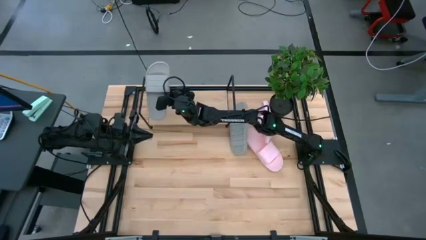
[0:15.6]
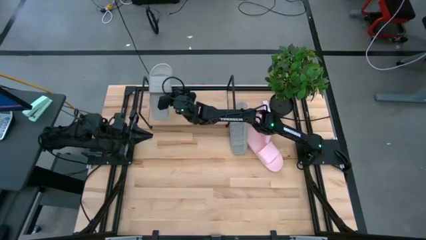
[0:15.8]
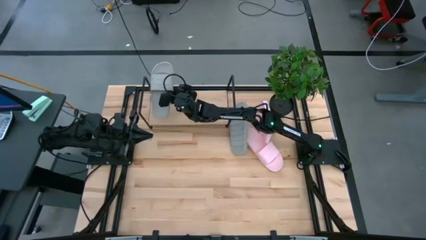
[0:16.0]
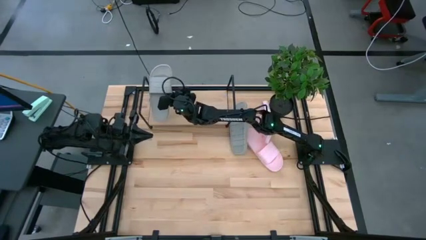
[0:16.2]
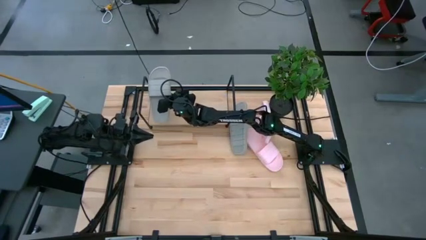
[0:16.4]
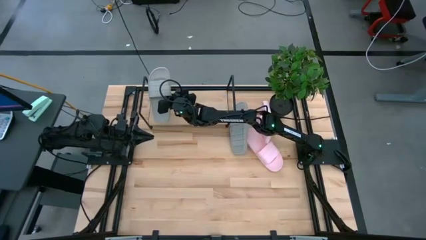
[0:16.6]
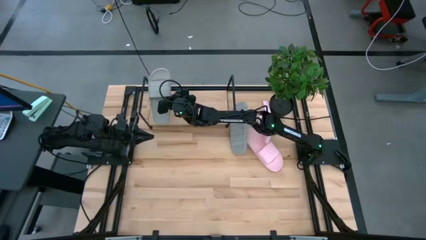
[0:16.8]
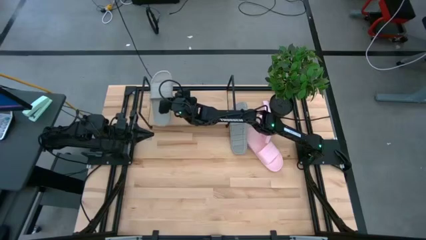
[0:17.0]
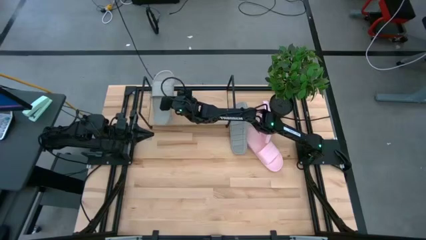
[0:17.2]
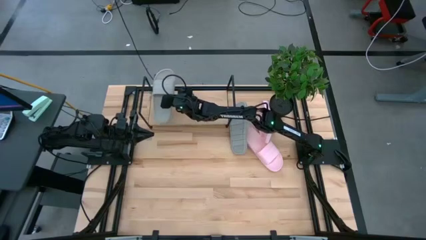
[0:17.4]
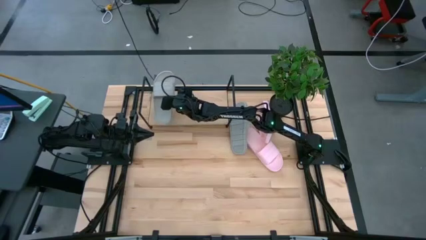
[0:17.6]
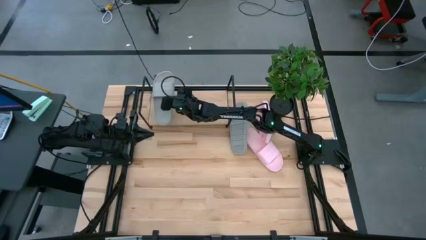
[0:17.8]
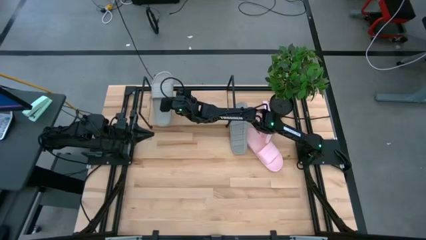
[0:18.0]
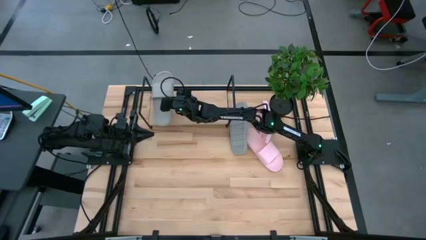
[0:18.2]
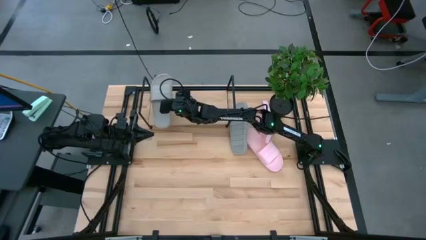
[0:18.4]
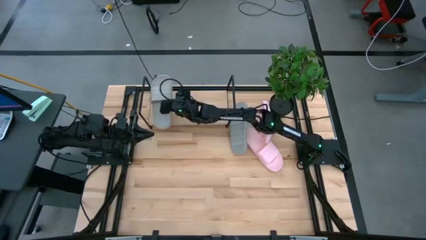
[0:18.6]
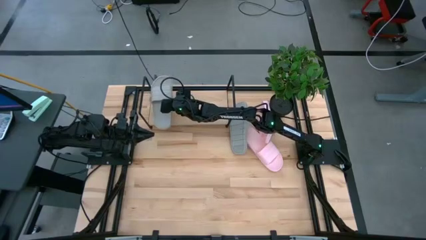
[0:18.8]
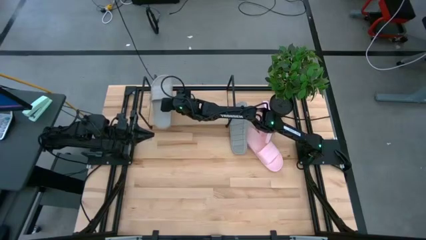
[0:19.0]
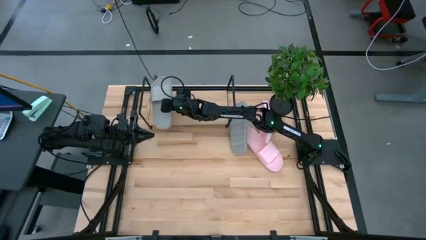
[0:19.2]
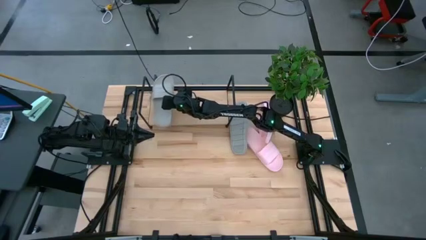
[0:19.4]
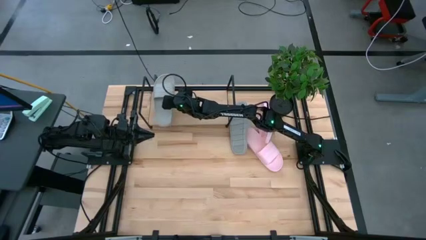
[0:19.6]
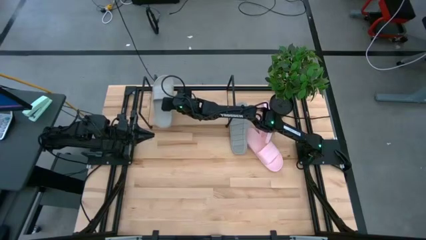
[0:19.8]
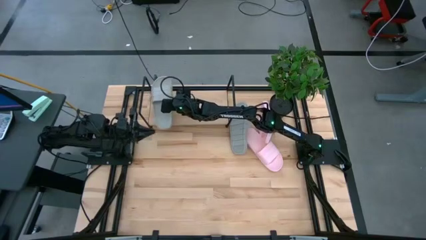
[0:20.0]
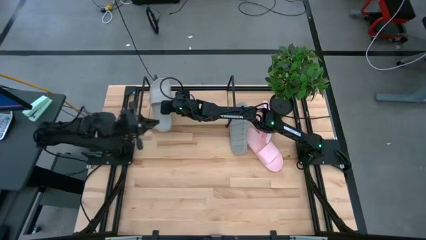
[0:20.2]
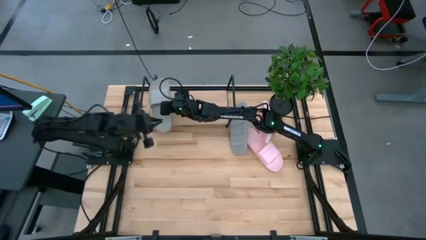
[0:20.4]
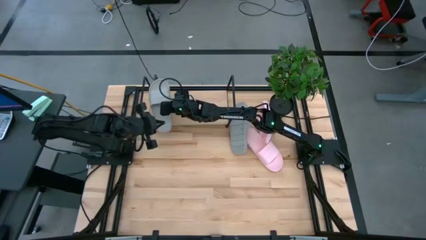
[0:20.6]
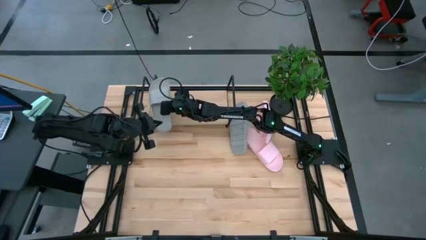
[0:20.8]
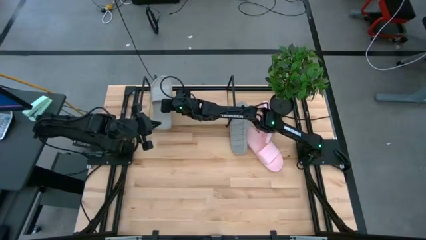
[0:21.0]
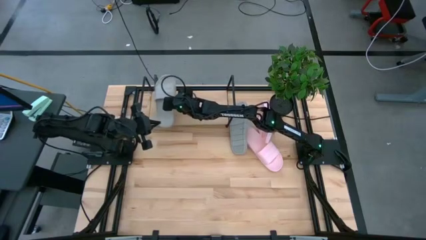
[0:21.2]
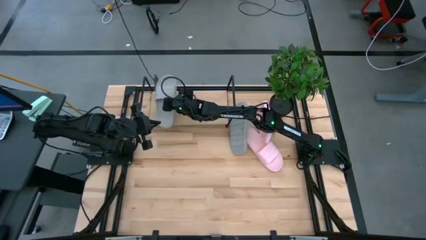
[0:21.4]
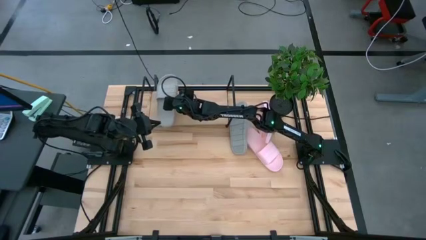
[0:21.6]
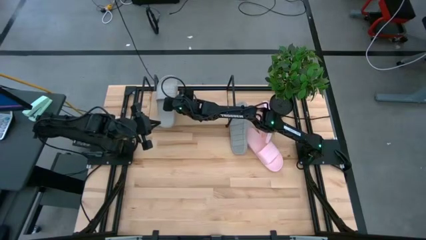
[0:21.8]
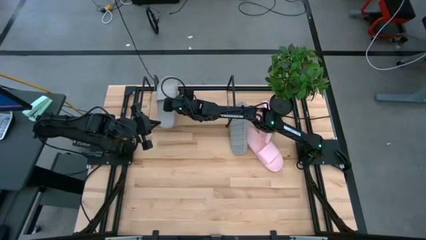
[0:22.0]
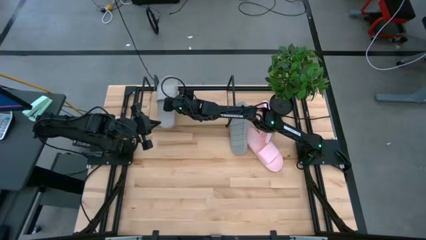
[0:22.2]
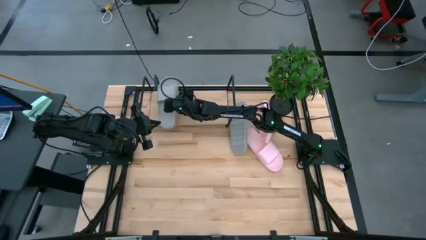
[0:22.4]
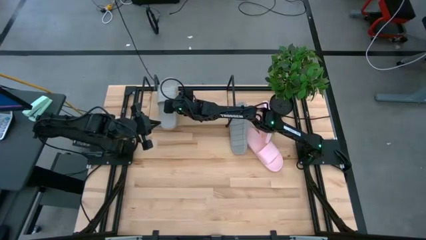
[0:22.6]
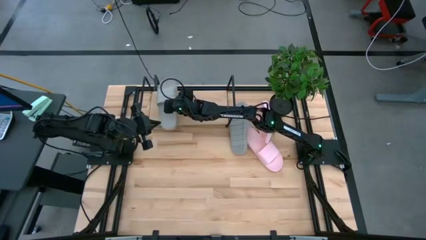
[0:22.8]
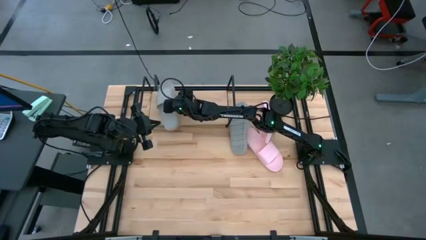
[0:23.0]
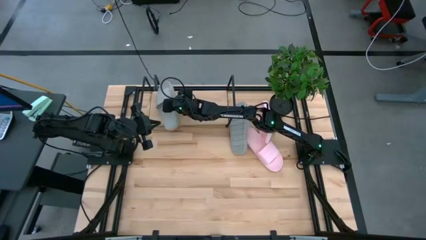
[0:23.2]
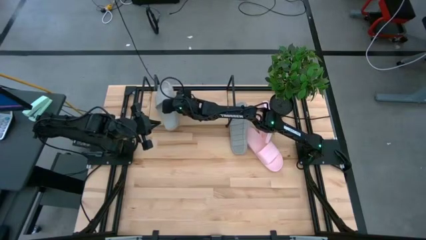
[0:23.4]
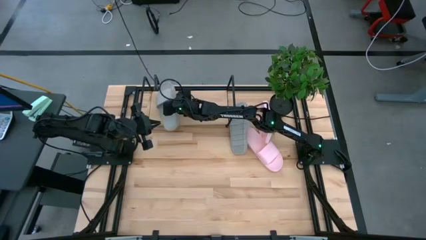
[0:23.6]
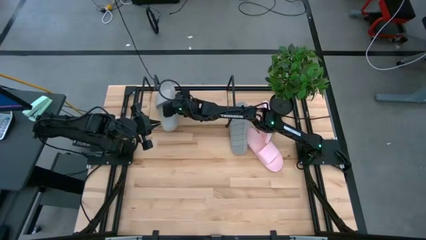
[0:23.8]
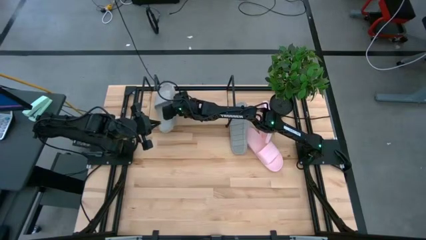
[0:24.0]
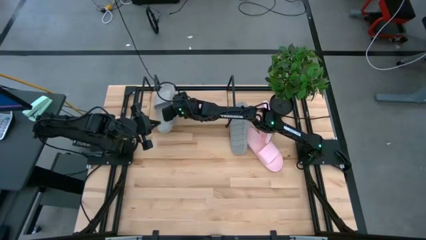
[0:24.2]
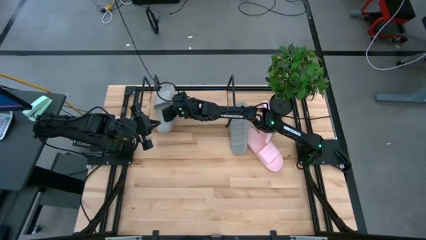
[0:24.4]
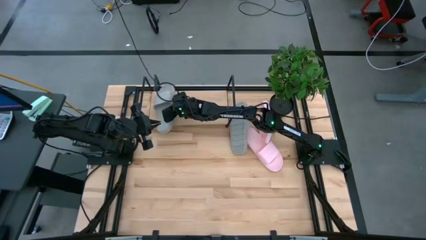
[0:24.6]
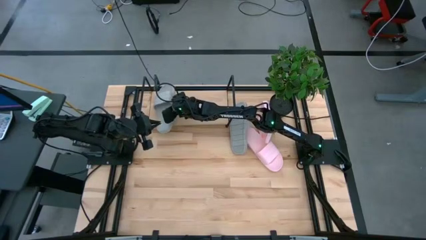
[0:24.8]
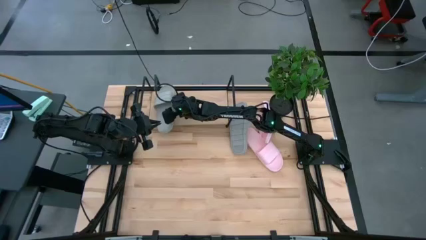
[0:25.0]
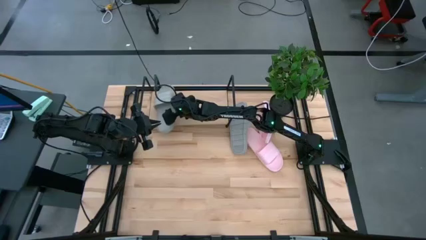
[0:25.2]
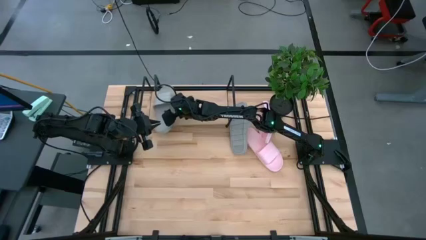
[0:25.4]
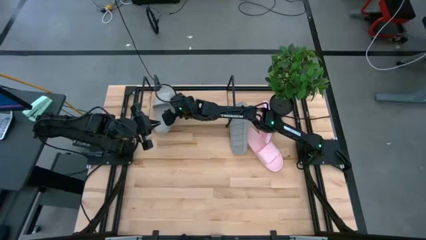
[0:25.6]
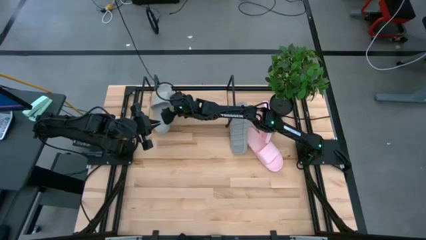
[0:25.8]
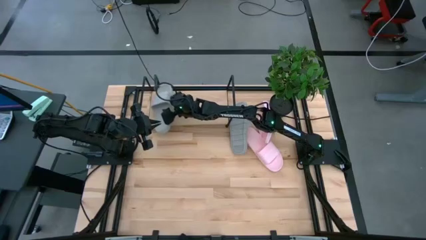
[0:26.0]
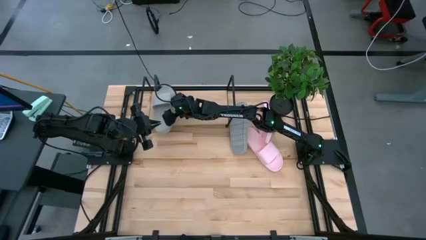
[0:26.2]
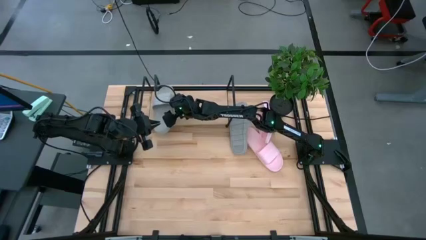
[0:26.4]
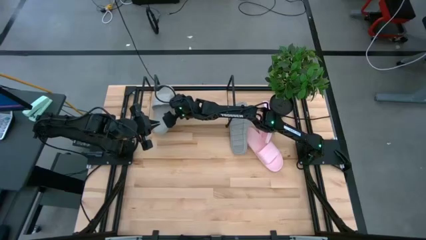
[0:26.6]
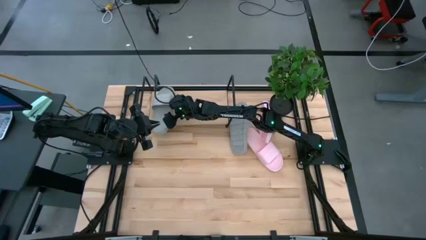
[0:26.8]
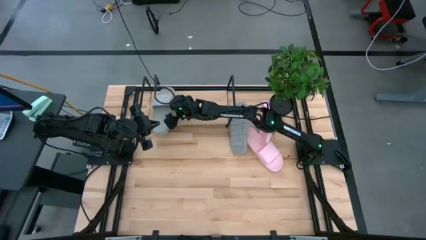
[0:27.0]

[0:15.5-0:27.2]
Task: Pick and place slides into the shelf
Put the bottom gray slippers on the shelf

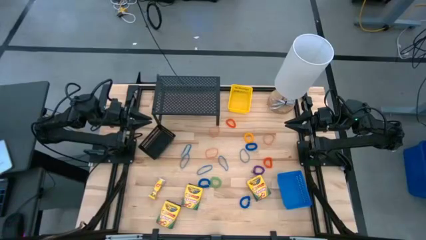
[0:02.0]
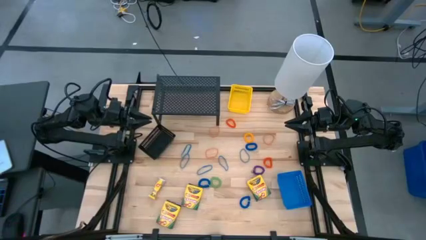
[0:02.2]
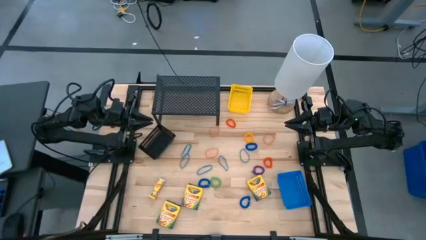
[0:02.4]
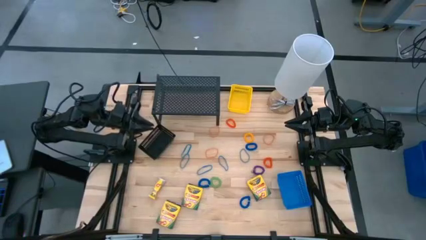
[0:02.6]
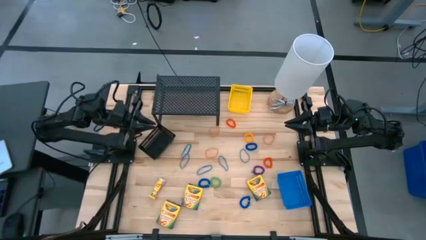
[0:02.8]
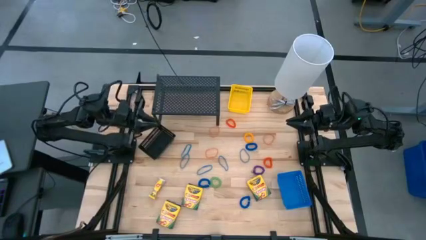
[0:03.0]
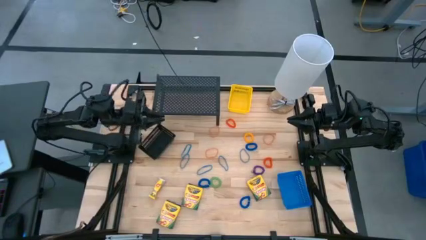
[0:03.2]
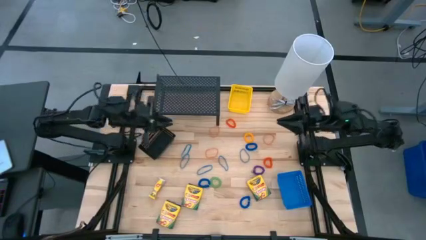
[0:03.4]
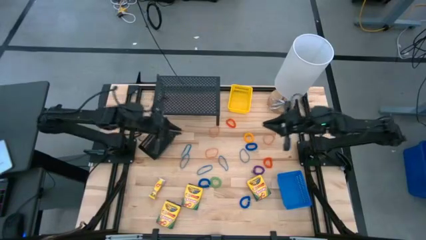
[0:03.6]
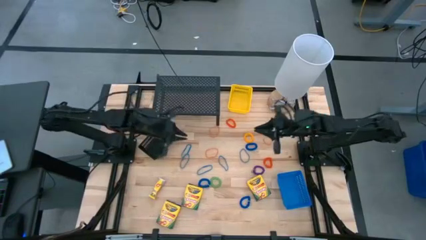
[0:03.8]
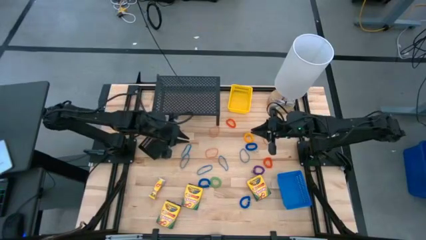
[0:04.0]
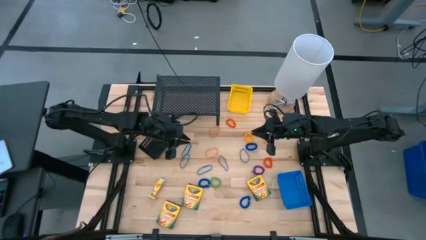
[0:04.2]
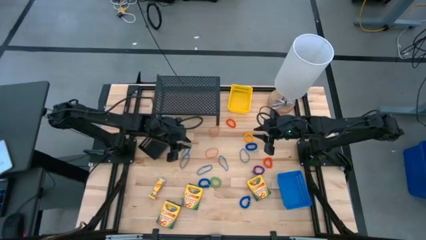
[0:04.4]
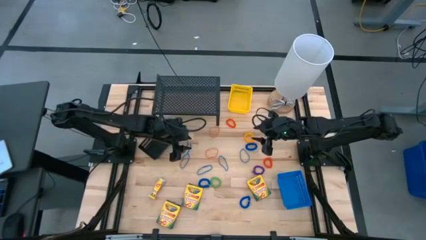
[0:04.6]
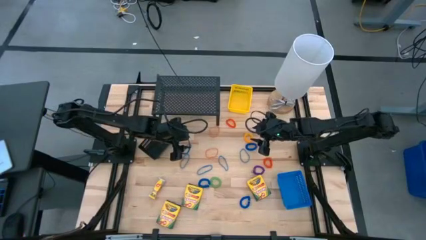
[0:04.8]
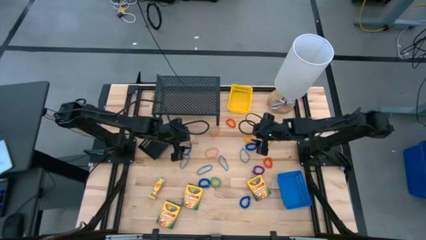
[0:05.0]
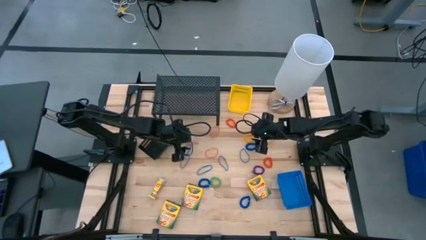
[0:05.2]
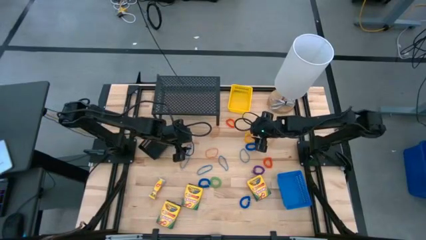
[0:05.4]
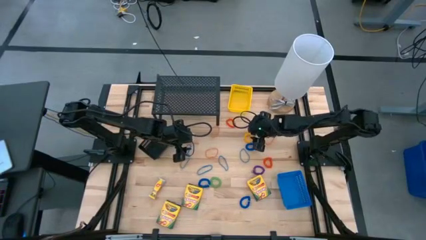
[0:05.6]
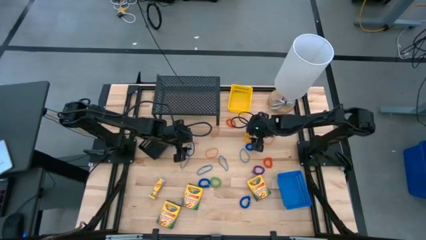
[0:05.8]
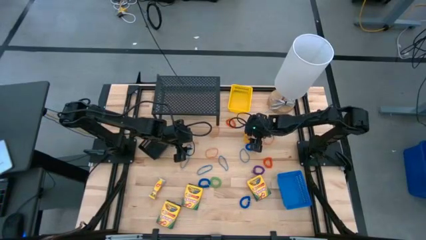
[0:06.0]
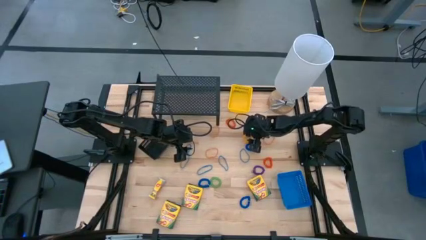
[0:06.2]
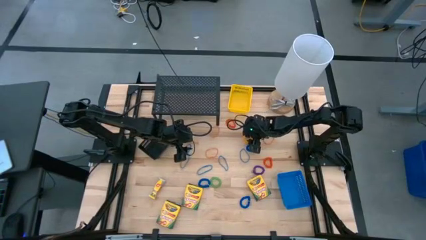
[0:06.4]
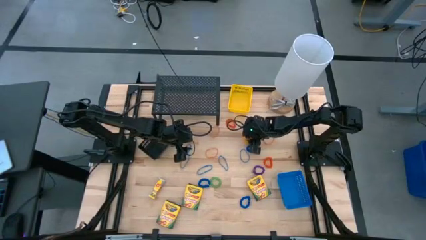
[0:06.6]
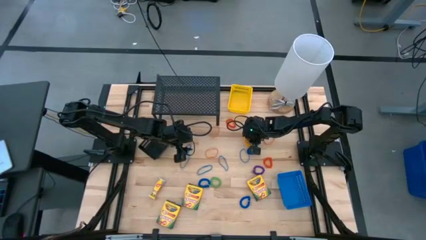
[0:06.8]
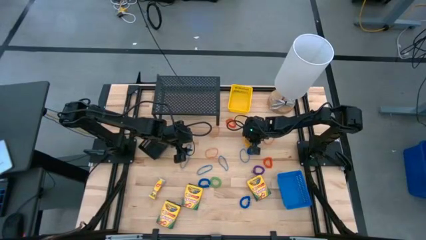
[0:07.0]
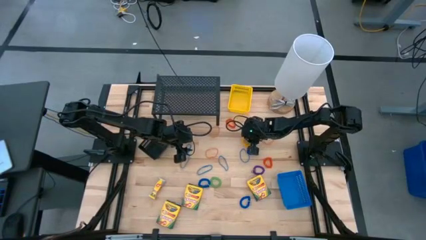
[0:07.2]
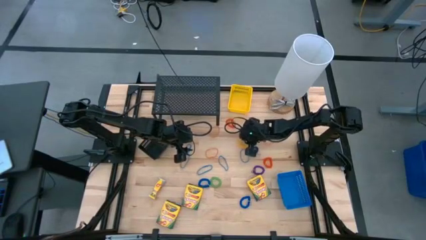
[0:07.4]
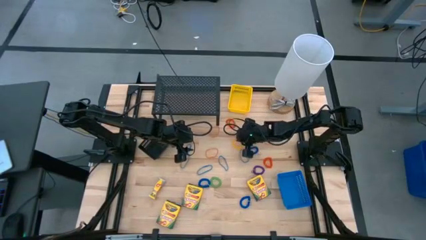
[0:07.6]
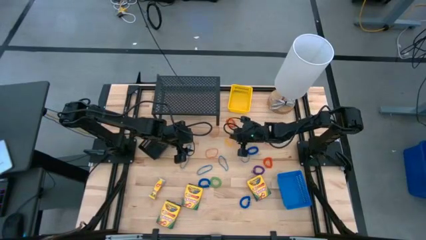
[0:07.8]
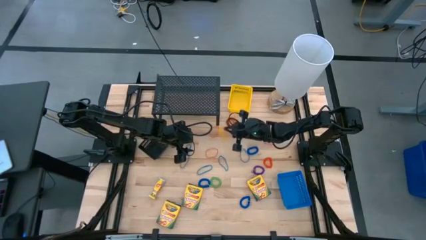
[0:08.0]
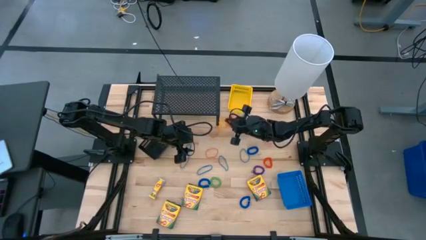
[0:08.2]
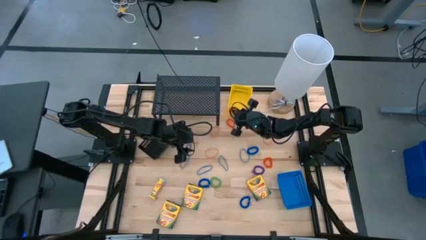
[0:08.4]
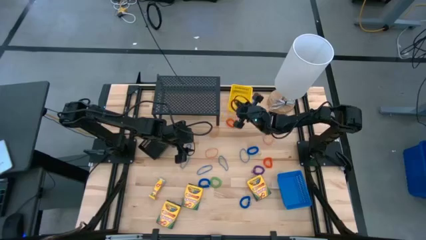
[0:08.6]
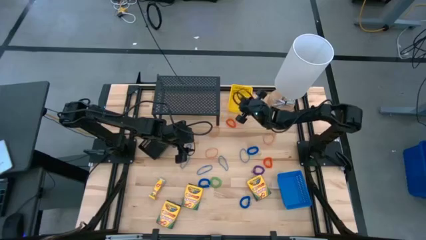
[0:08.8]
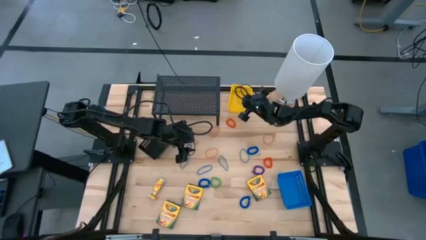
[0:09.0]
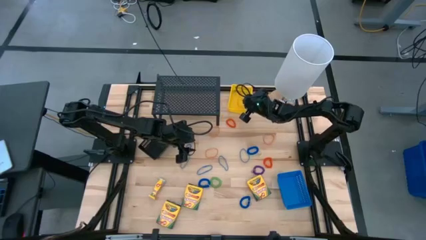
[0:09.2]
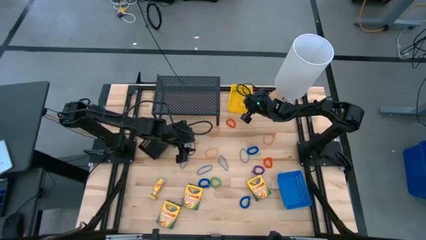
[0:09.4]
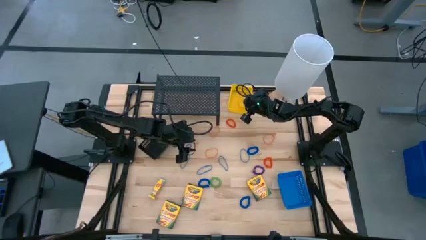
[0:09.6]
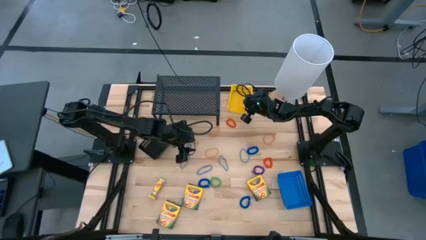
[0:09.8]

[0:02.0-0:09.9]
Task: Pick & Place Office Desk Supplies
Put the yellow spring keychain into the yellow bin
